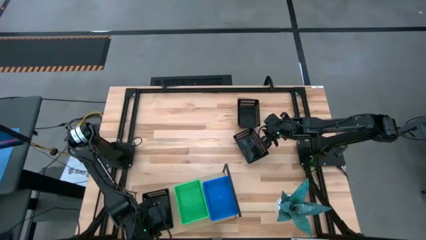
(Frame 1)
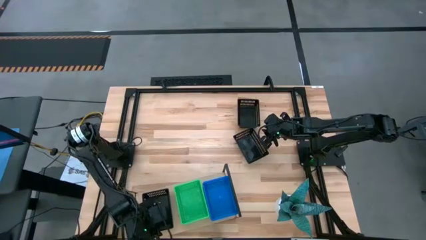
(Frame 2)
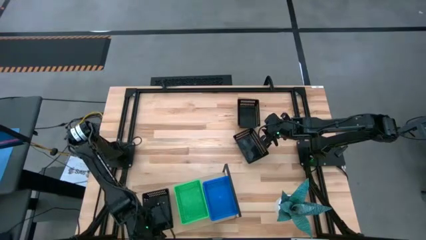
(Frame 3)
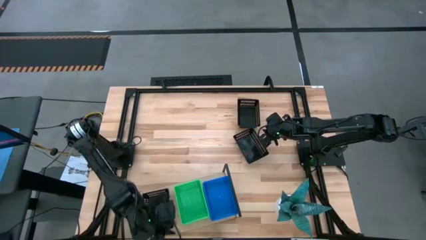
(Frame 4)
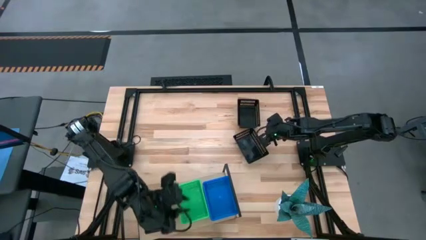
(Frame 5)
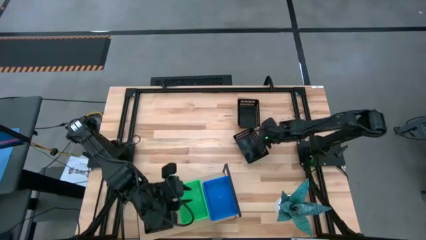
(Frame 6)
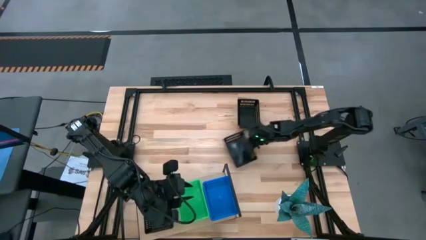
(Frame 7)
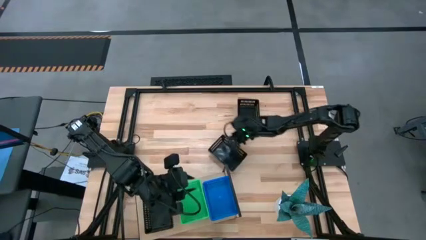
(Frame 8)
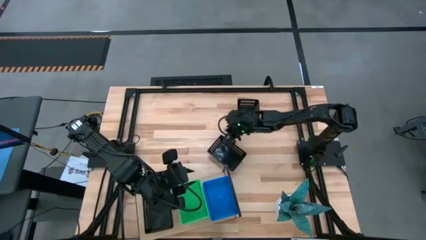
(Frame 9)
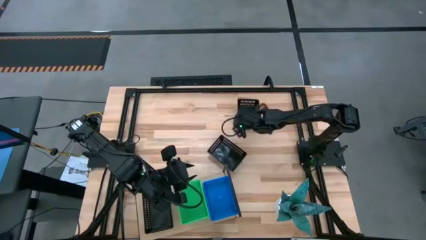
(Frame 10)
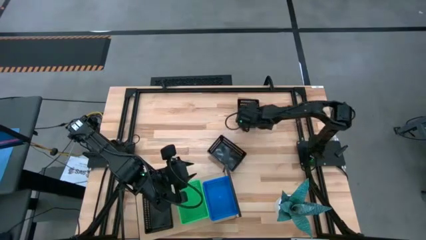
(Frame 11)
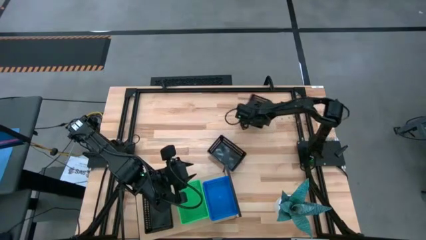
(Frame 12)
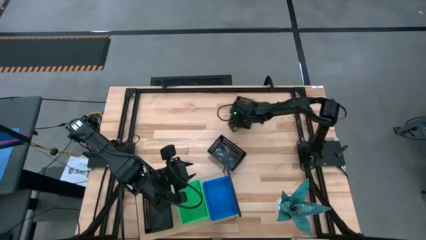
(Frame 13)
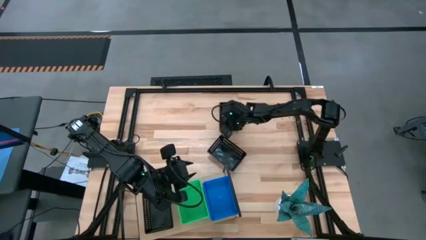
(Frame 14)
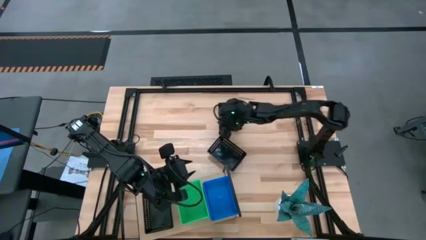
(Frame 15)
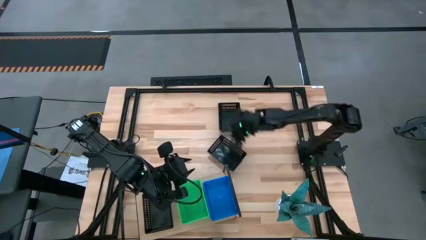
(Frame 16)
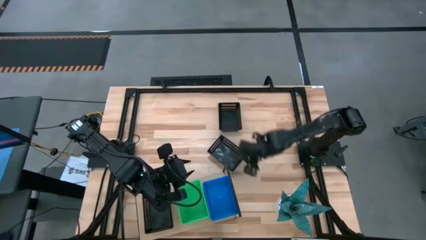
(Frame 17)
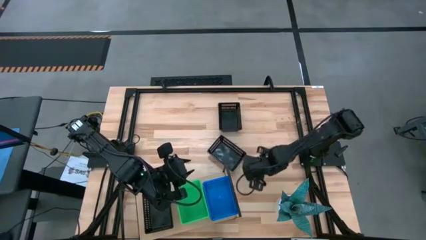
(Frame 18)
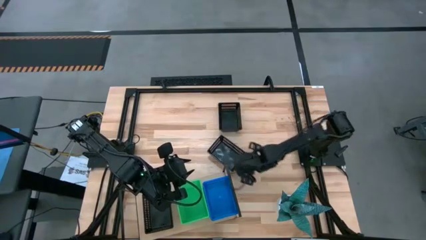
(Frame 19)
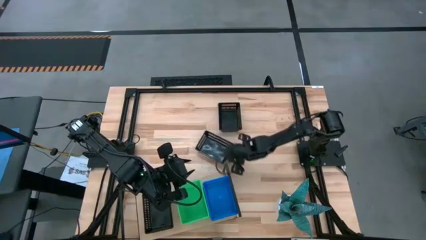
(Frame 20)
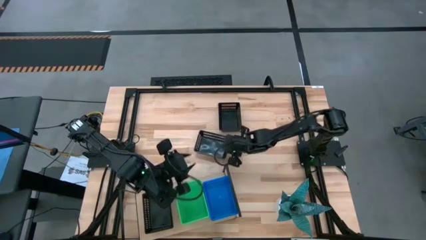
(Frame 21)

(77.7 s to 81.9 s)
Task: Stack baskets on shelf by color
Adjust the black baskets to the center of the table

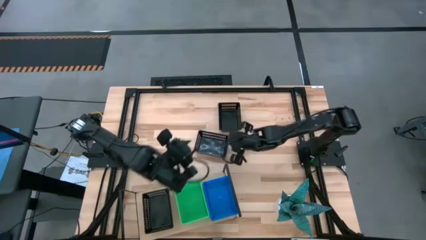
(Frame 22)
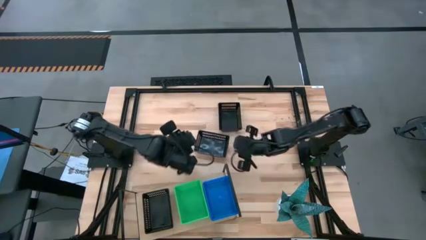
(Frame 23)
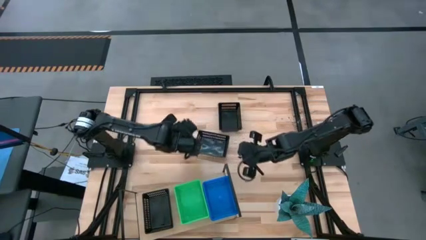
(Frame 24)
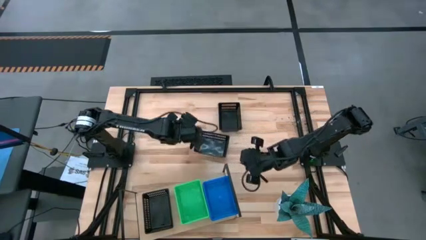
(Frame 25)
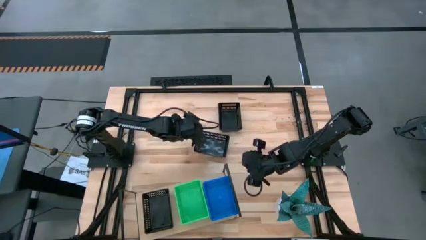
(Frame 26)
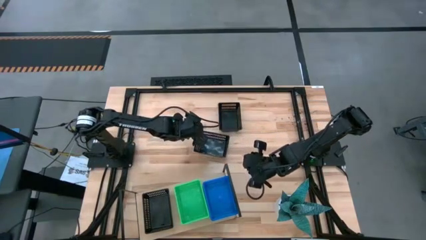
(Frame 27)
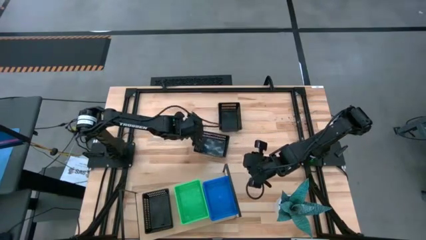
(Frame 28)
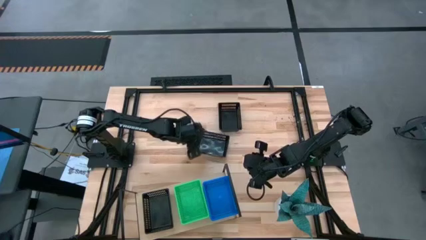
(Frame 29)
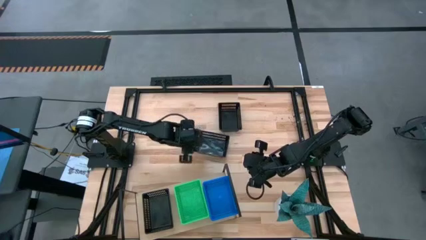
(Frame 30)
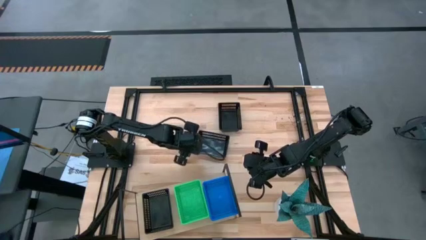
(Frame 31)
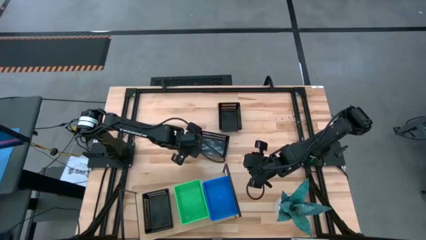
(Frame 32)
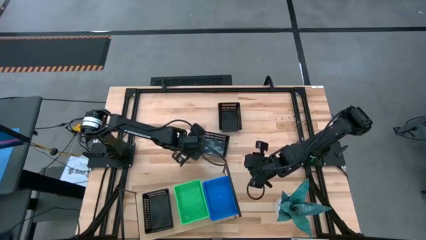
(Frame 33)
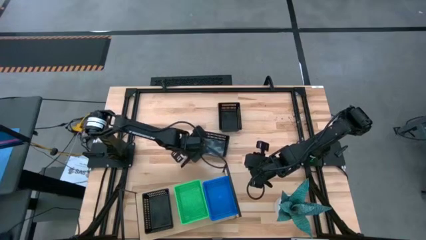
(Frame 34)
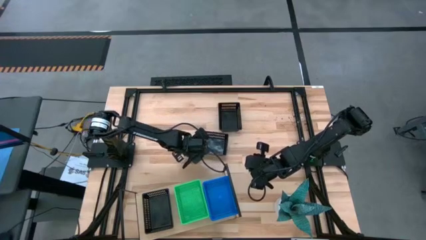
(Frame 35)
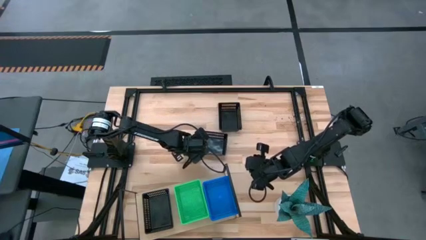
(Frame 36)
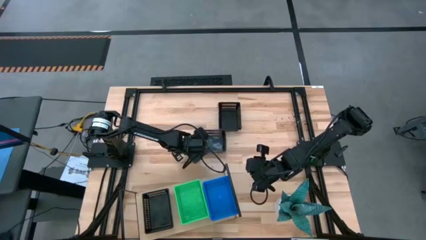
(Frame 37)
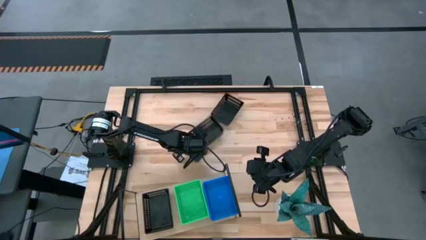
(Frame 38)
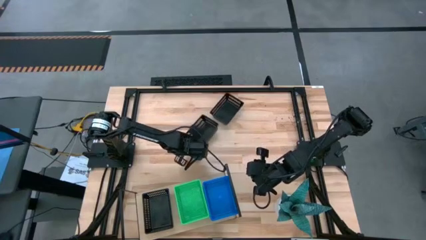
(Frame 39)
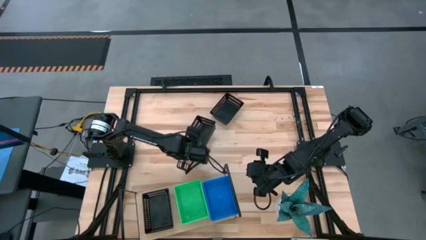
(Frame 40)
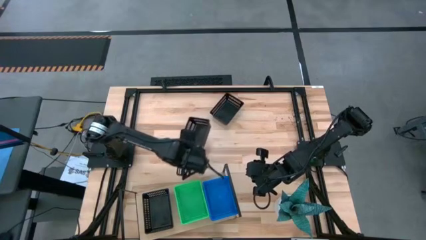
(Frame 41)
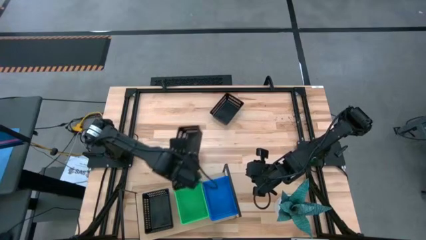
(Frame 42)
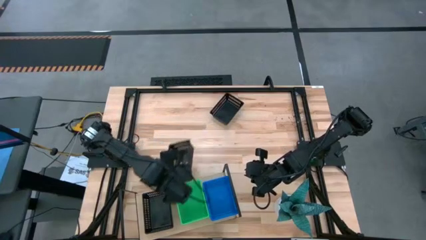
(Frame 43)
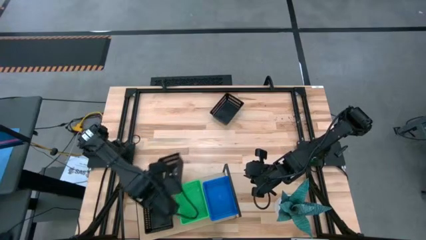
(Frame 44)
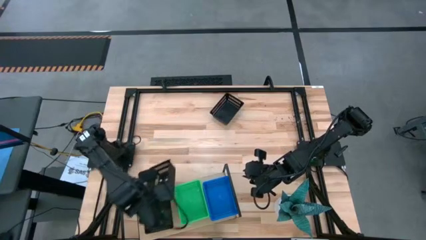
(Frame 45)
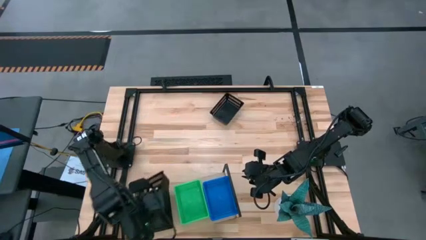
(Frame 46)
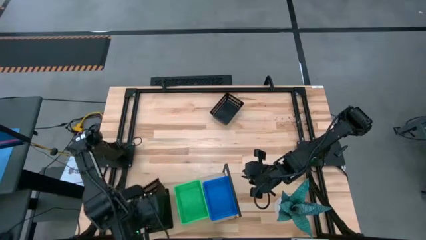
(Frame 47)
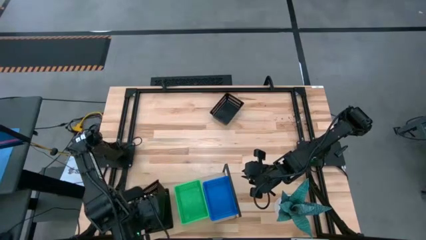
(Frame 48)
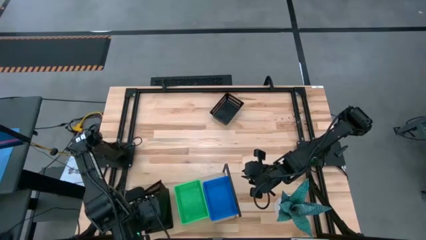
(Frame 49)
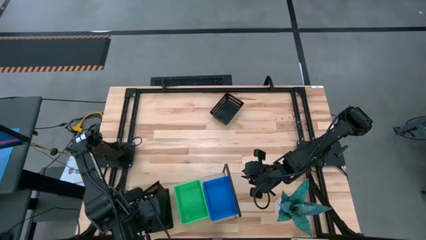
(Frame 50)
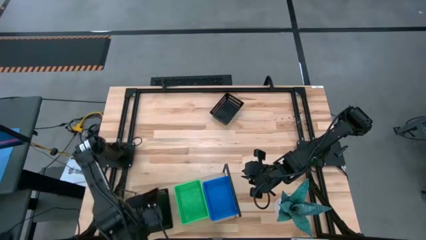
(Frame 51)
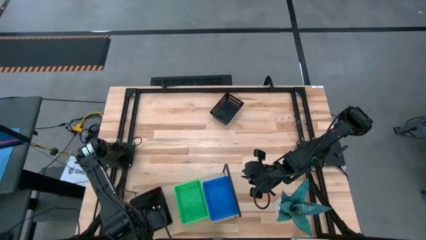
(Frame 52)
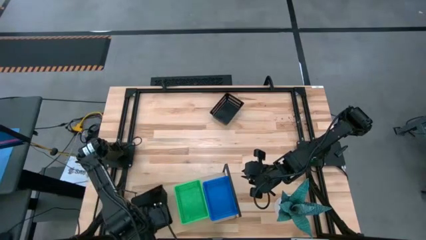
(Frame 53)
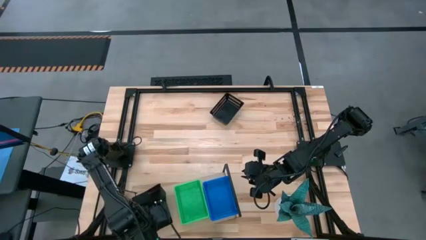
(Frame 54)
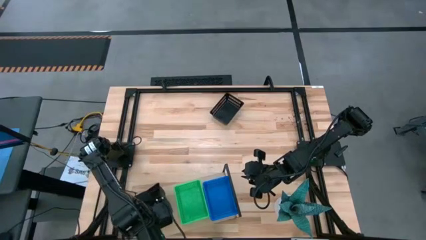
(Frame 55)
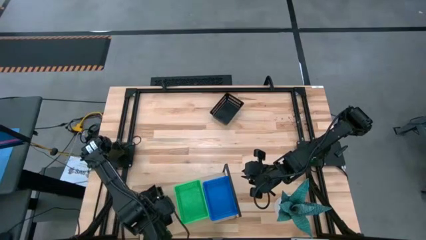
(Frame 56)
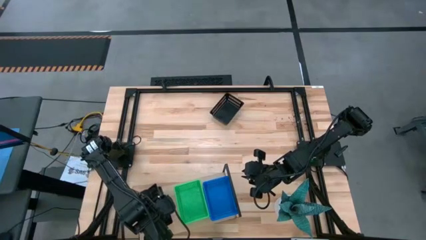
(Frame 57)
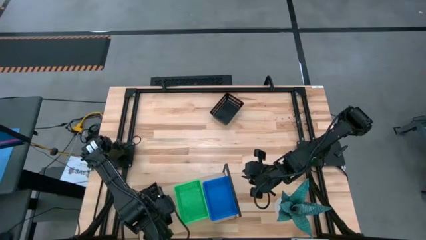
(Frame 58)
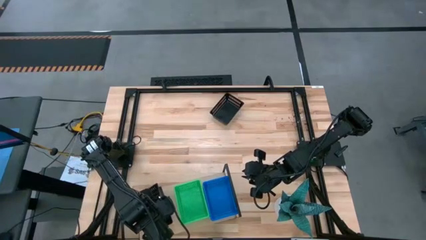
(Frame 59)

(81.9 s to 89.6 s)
Stack the bottom black basket on top of the black basket

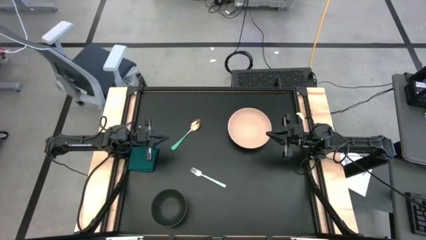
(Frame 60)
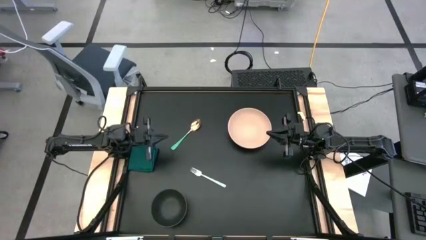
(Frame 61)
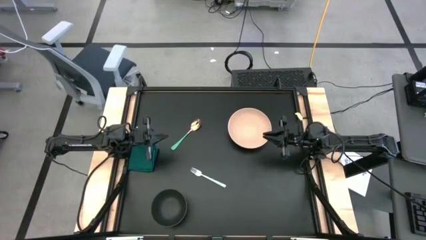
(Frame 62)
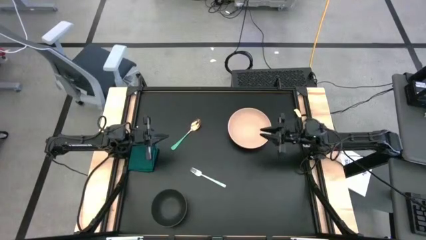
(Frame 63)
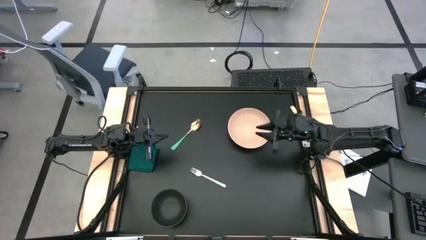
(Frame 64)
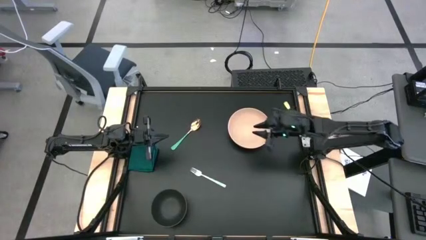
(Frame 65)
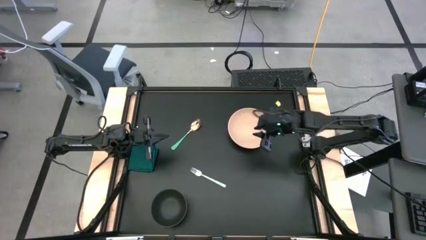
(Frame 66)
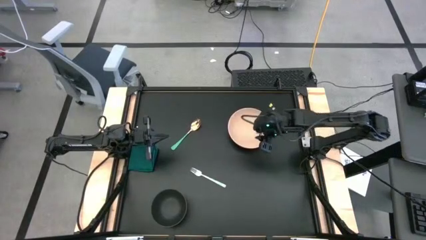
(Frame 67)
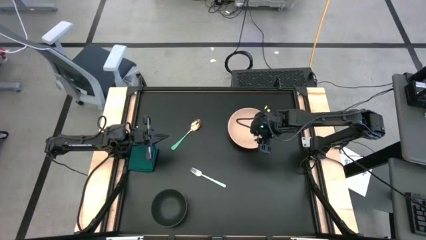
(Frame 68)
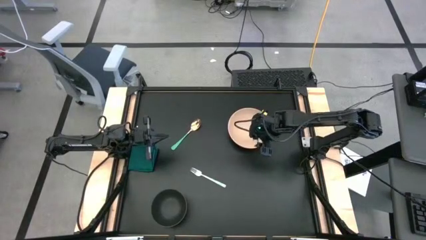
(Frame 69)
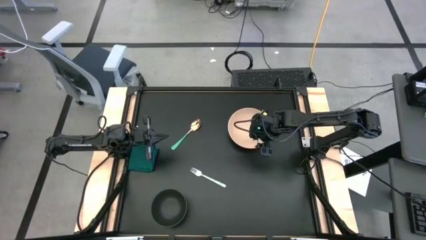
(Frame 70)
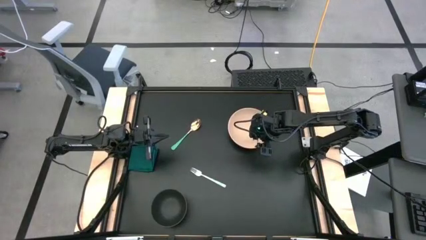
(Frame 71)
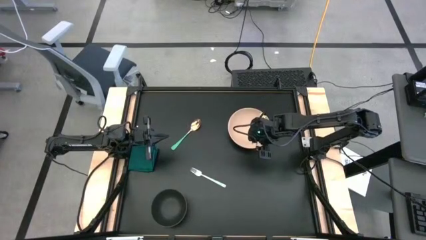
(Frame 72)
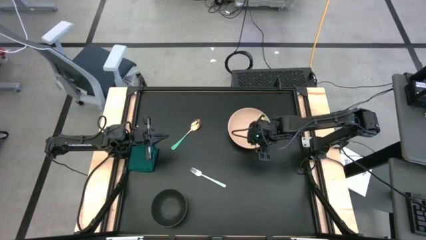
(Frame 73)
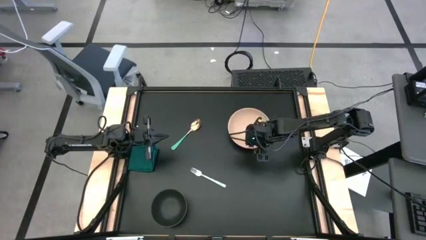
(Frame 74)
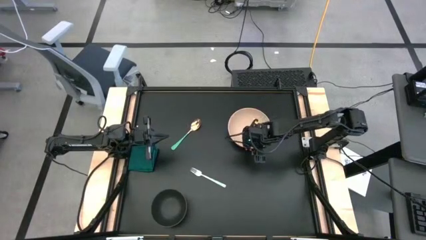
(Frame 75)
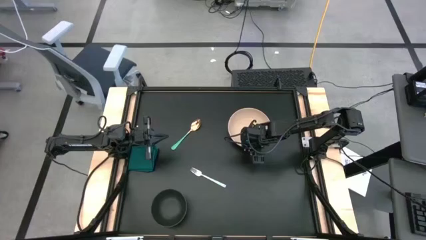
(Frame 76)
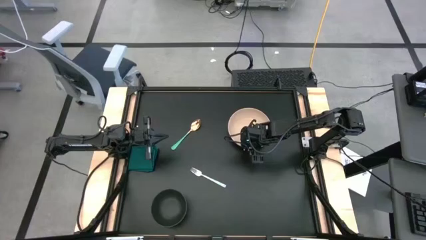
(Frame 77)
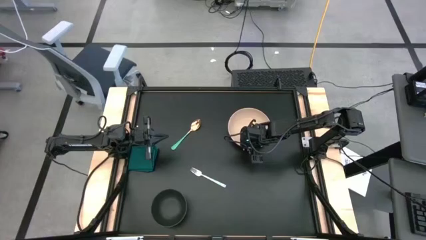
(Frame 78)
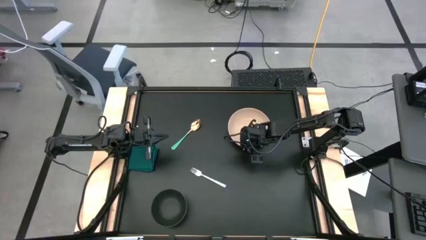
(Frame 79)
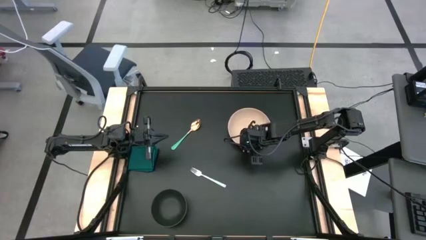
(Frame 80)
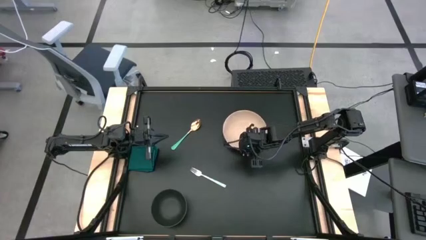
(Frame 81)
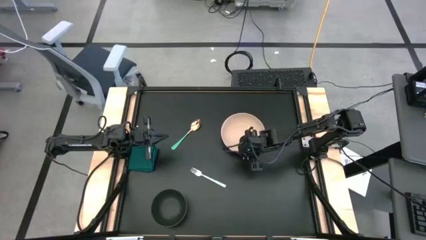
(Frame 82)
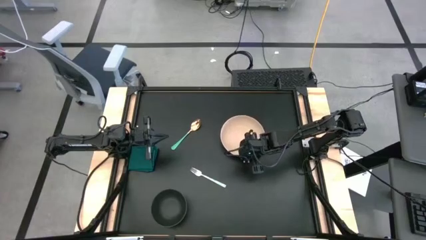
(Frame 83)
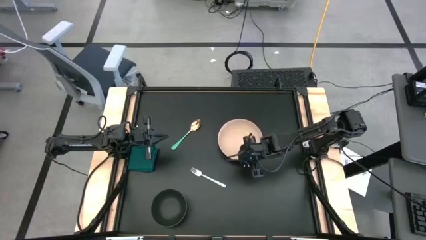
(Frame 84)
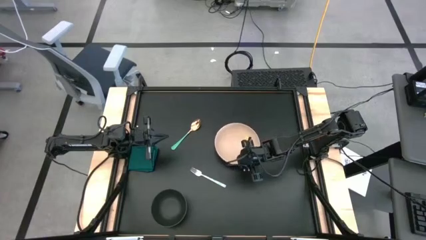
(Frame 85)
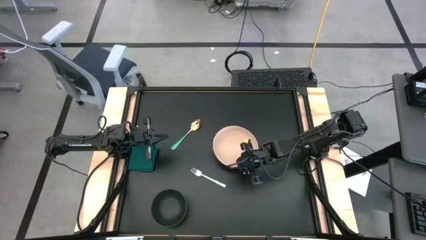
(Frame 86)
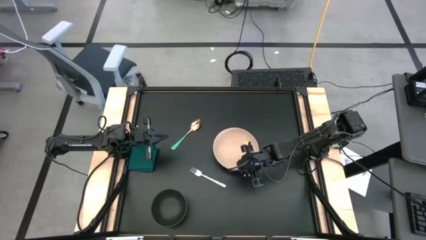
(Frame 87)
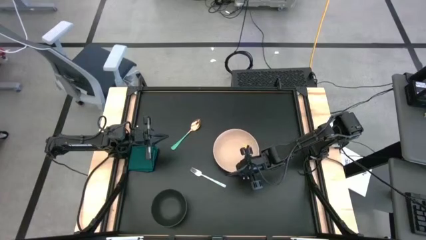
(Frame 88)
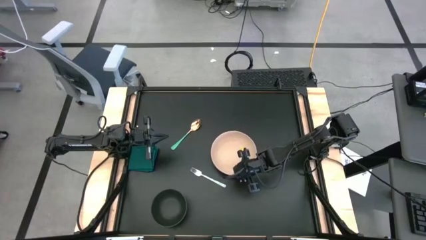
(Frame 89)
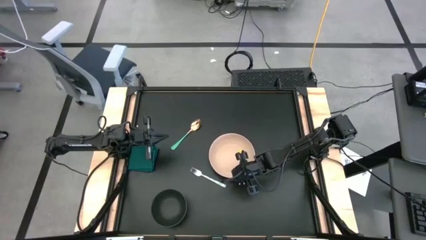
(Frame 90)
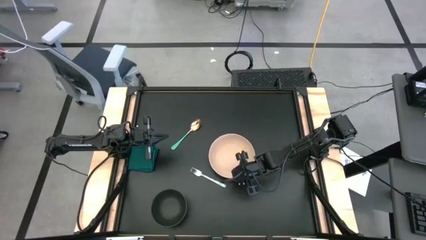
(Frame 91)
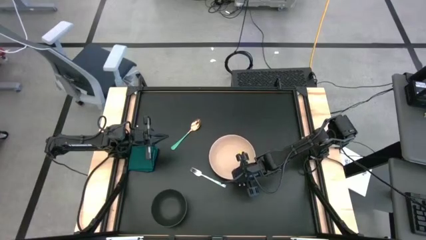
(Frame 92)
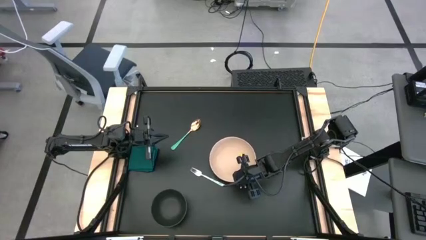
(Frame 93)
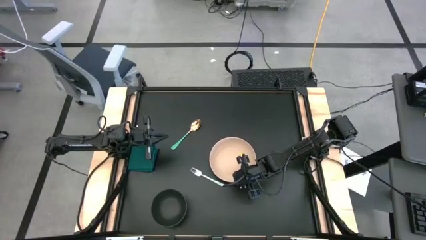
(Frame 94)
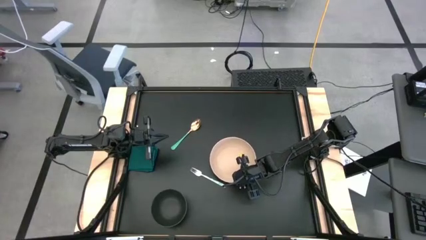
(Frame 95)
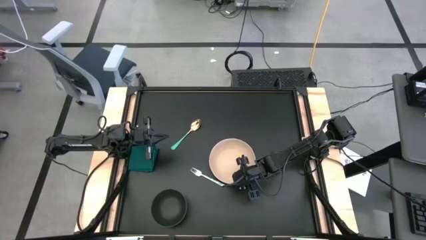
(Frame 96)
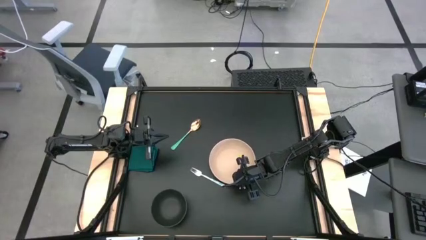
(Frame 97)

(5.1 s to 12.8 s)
Task: Set table place
Move the brown plate to the center of the table
